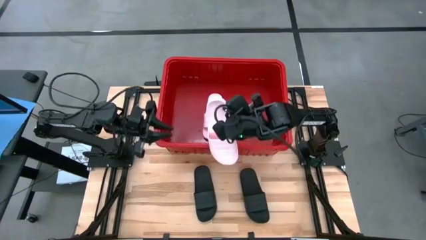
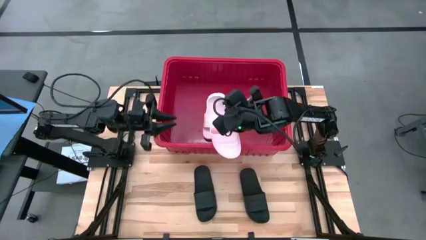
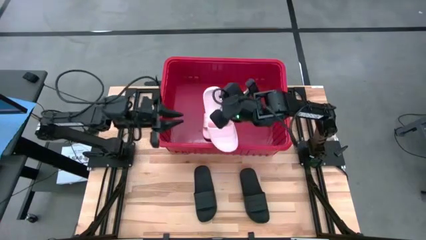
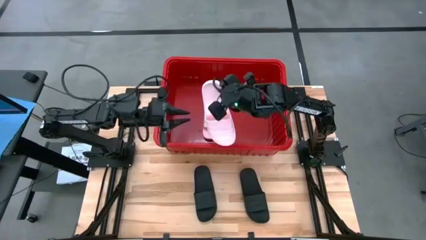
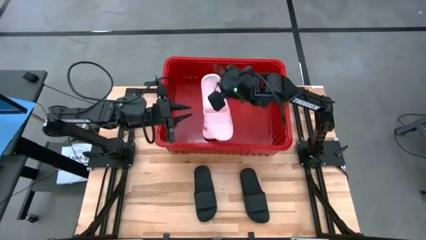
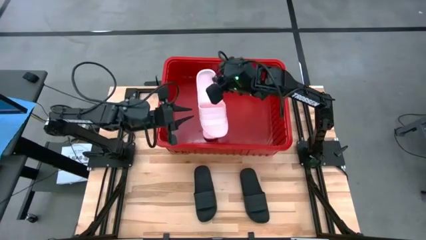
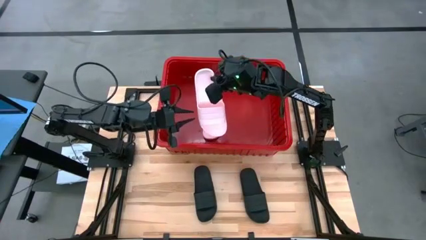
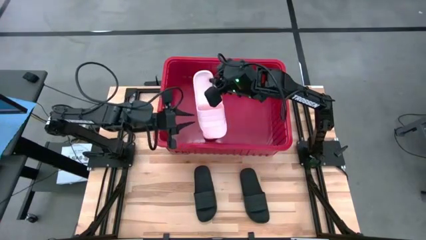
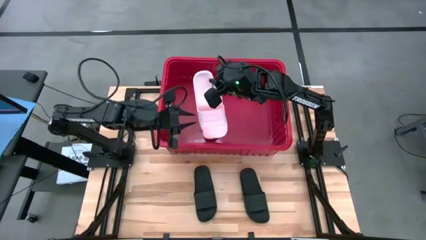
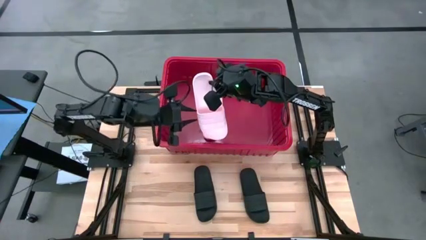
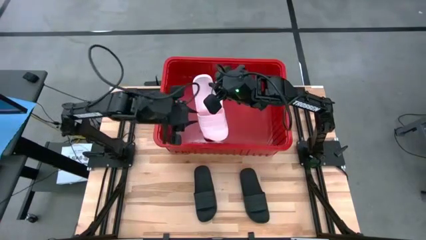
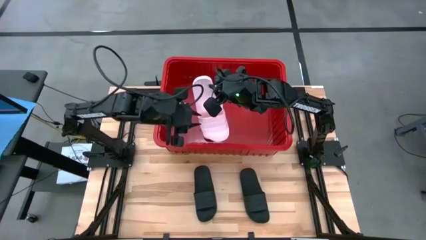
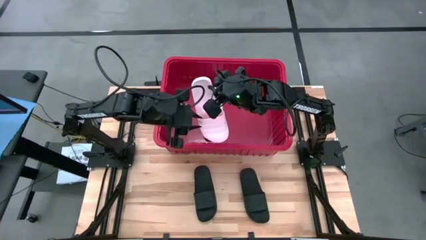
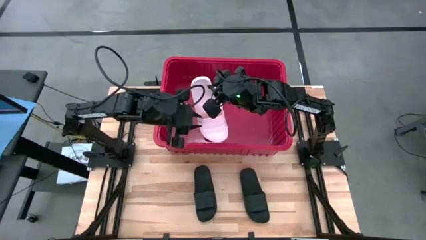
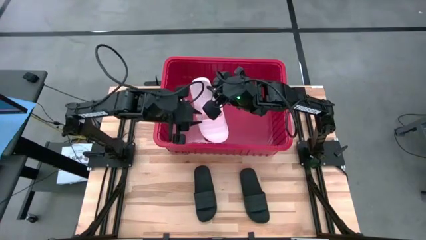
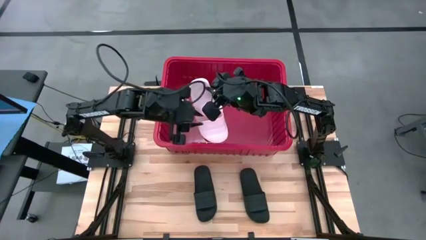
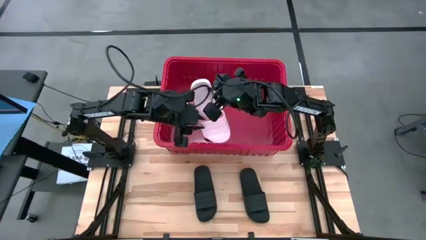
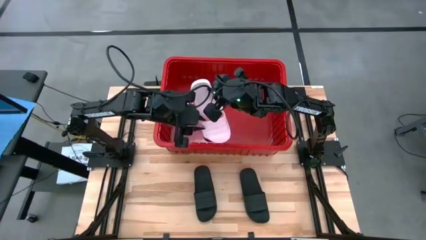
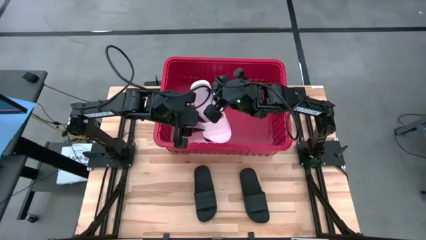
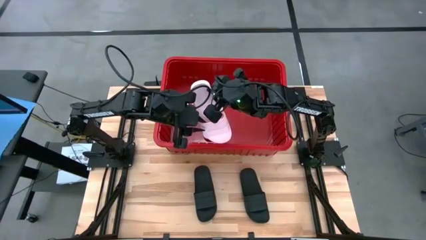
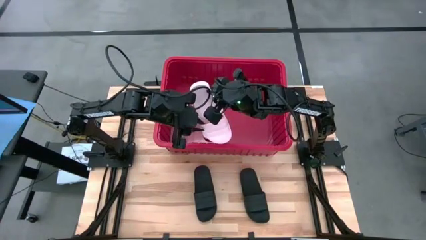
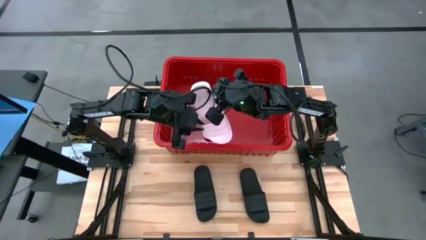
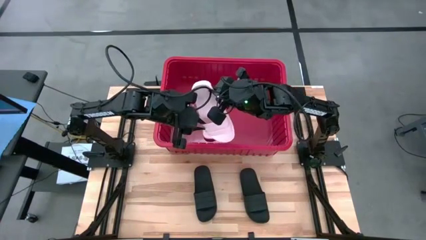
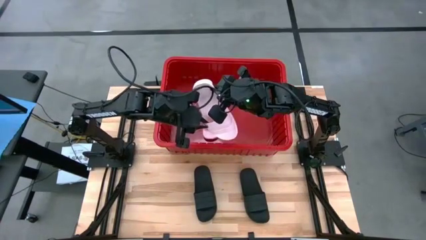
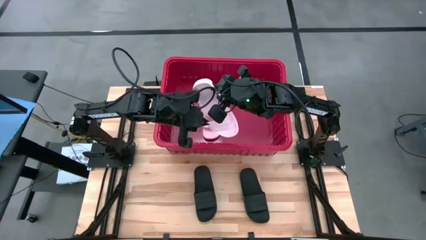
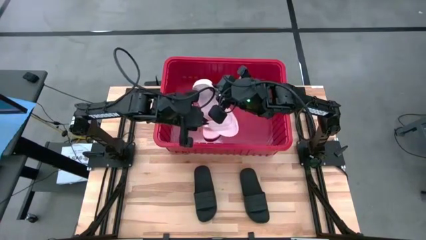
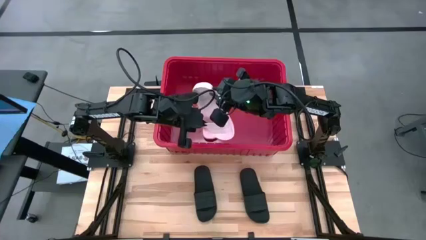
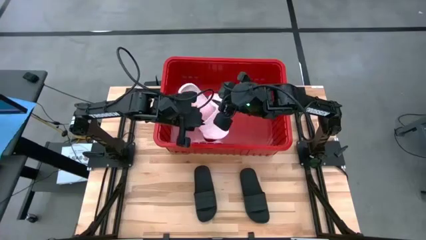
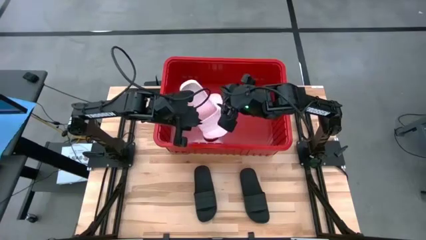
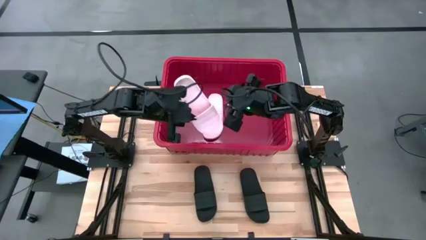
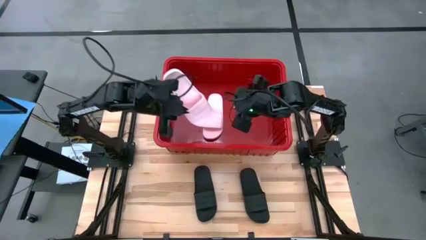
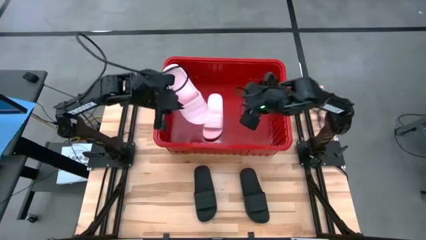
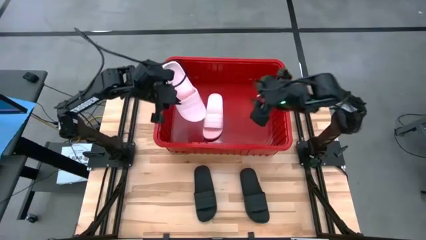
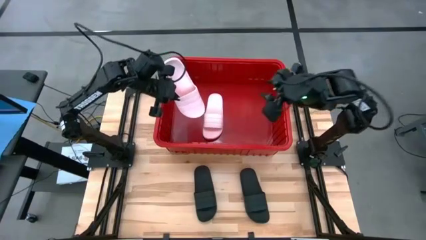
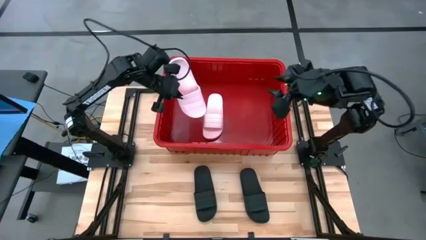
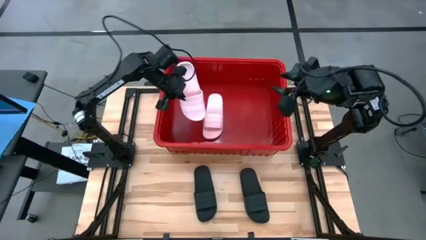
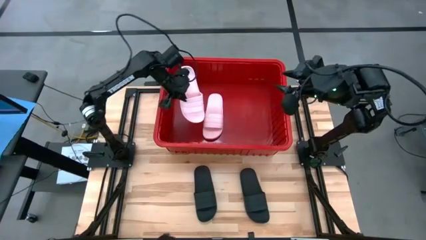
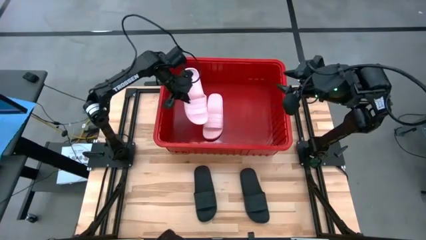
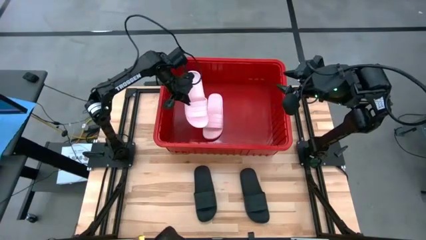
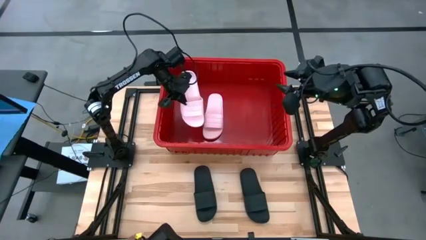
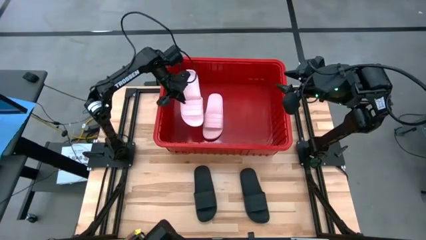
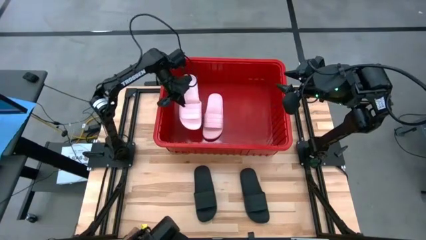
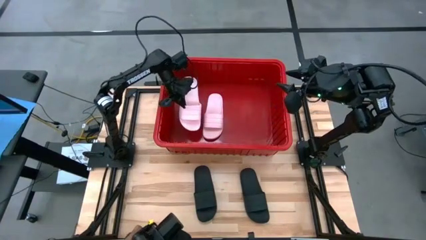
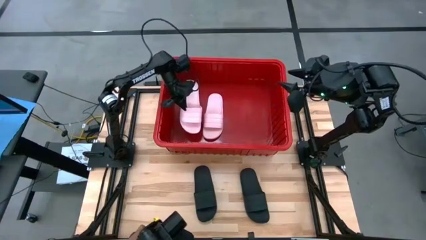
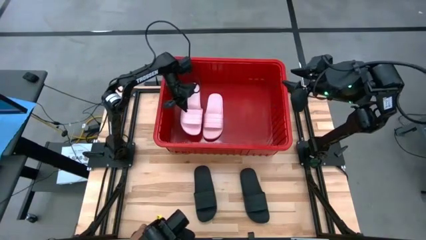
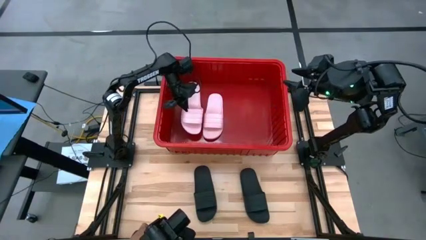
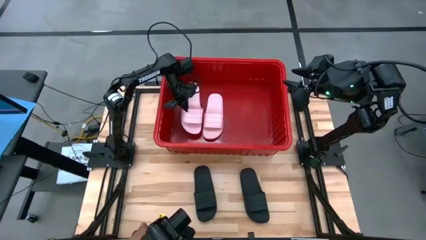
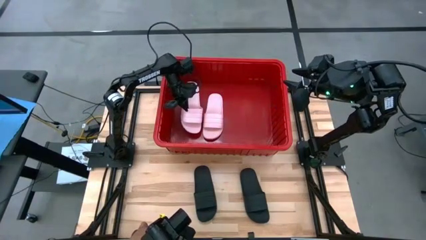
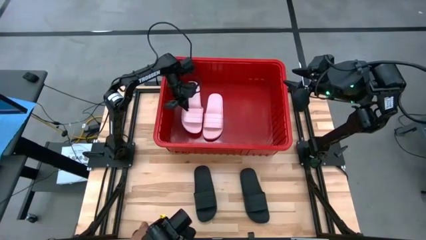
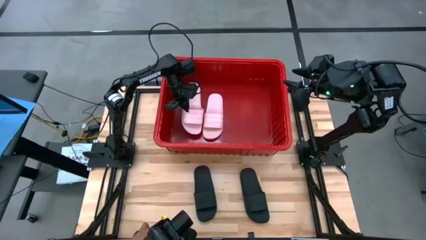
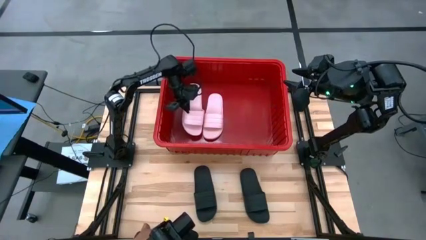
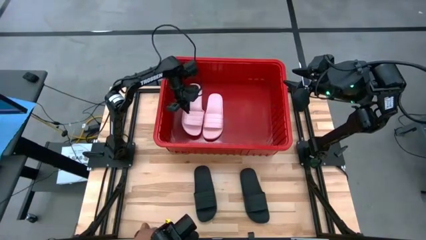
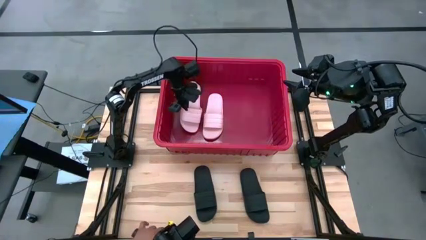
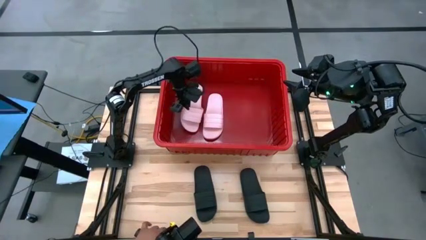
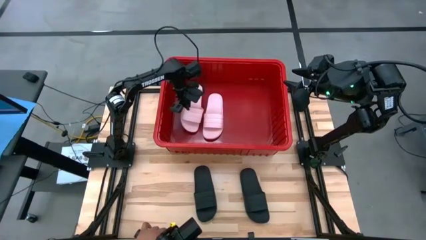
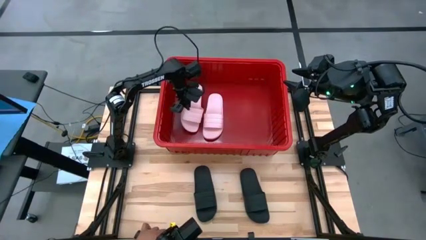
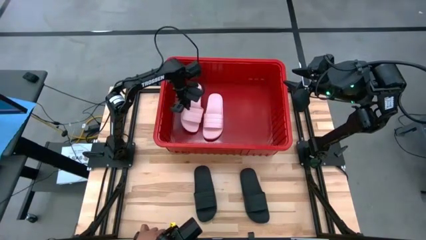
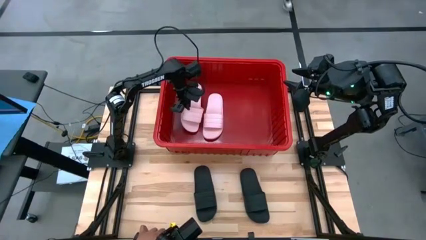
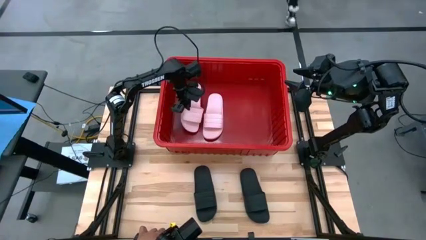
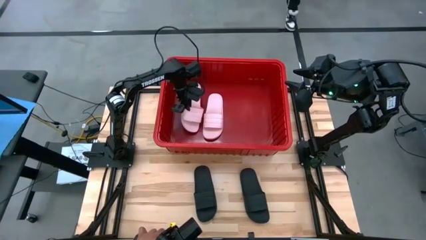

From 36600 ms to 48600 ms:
Task: Pick and place slides into bin
Put the pink slide into the red container
